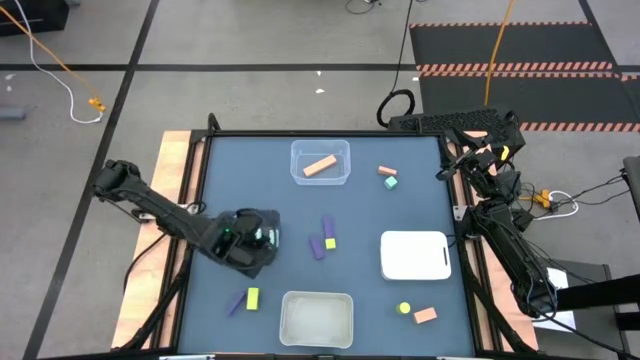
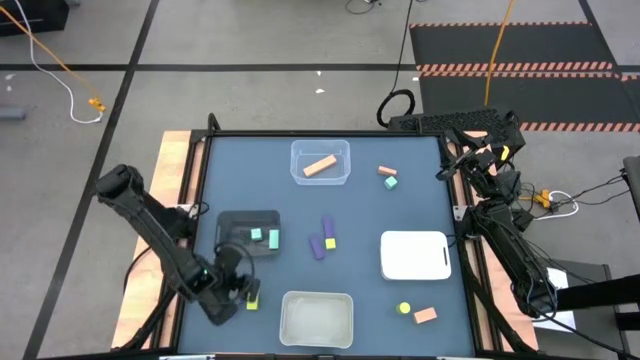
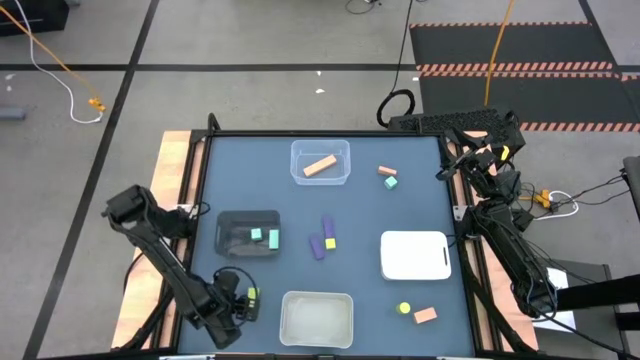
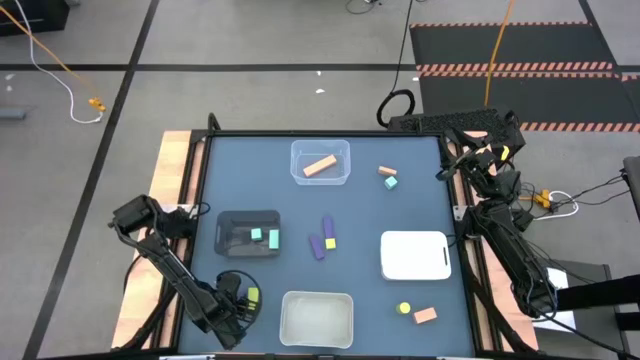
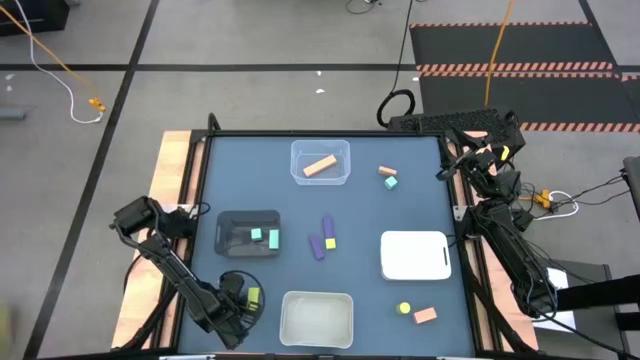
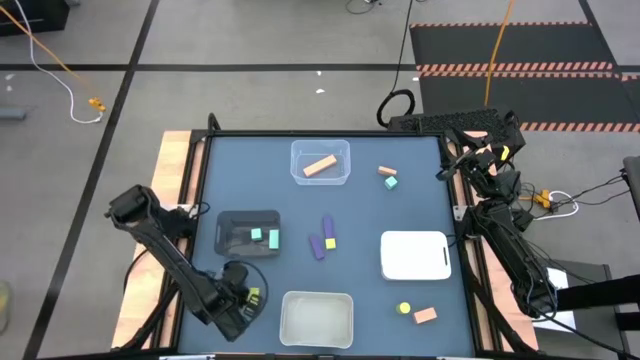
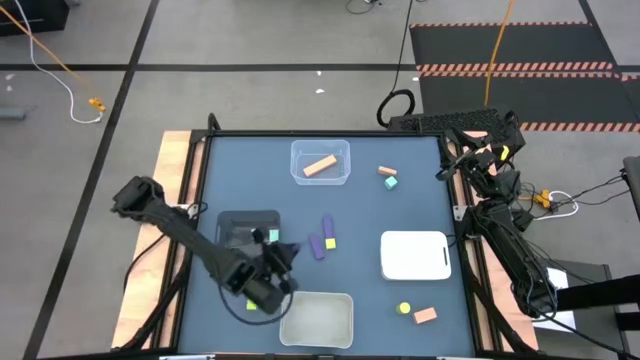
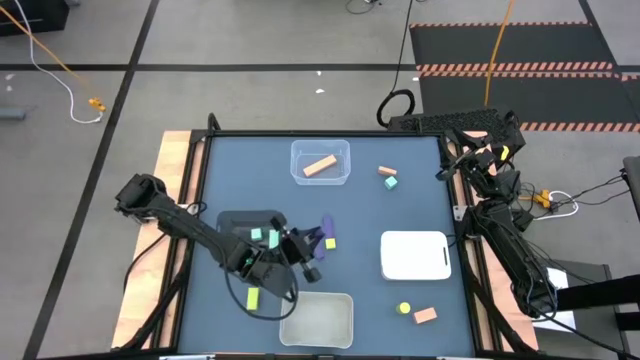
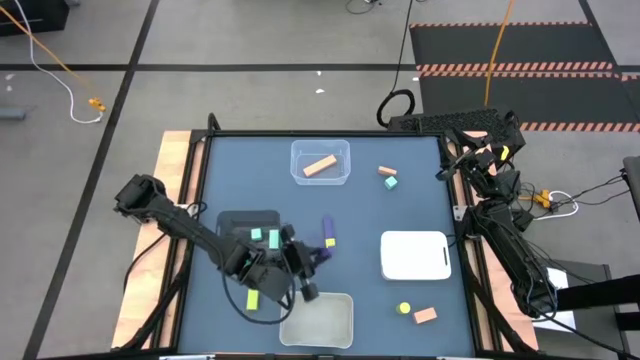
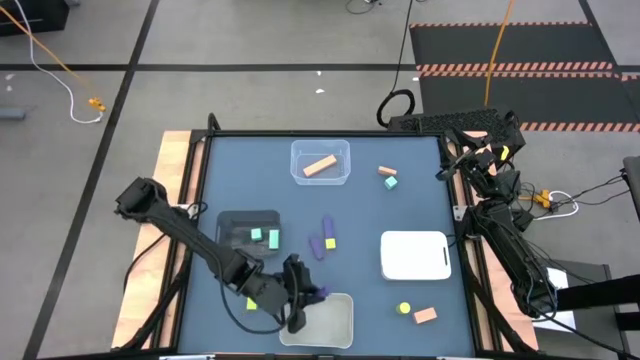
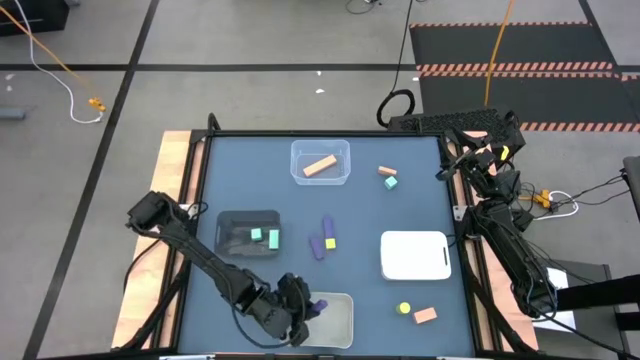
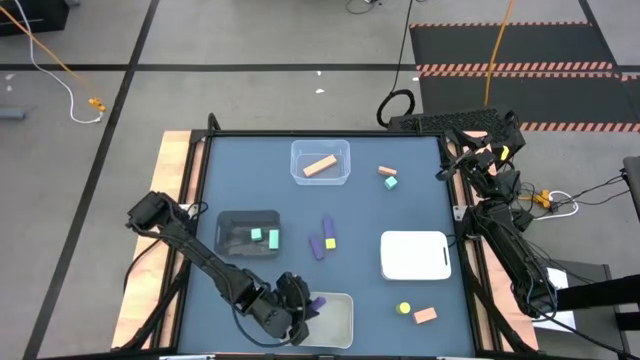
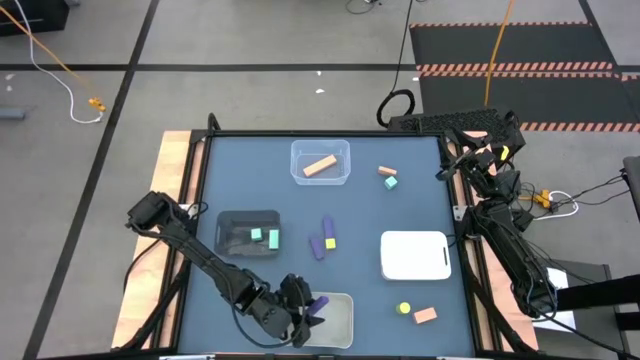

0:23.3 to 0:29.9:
Task: Sort & place blocks by color
Put the bottom violet block into the gray bin

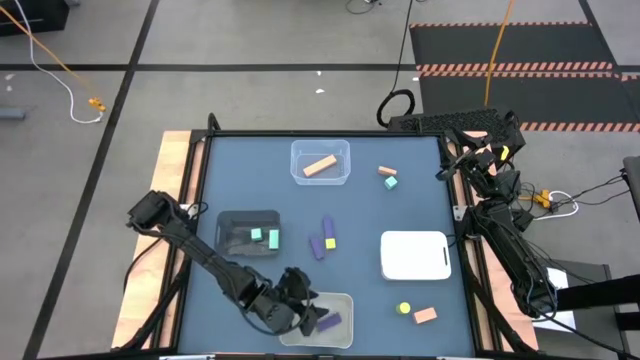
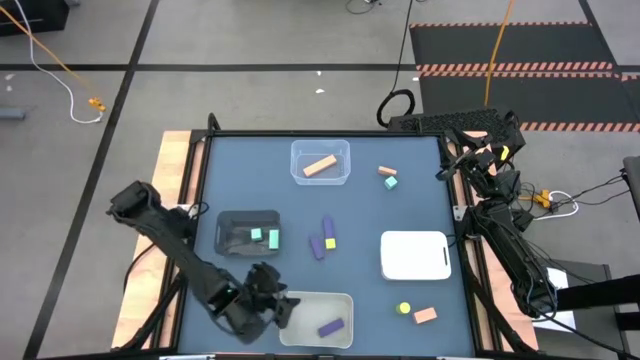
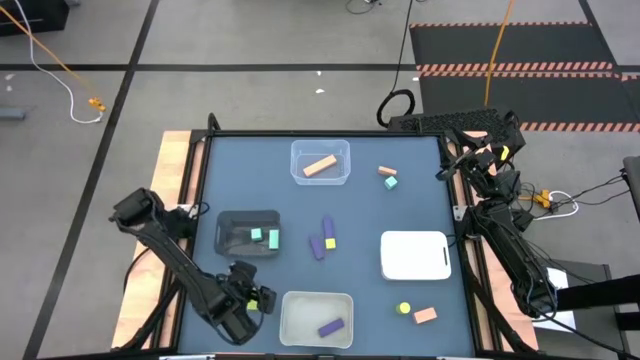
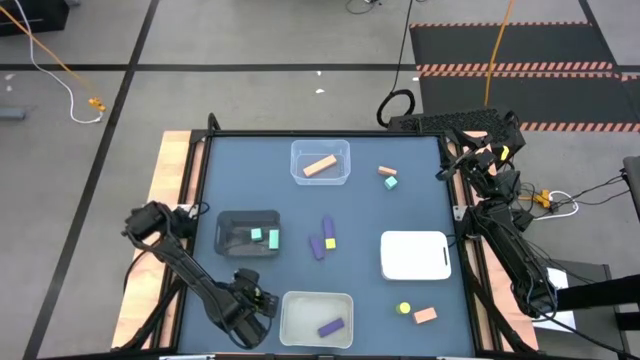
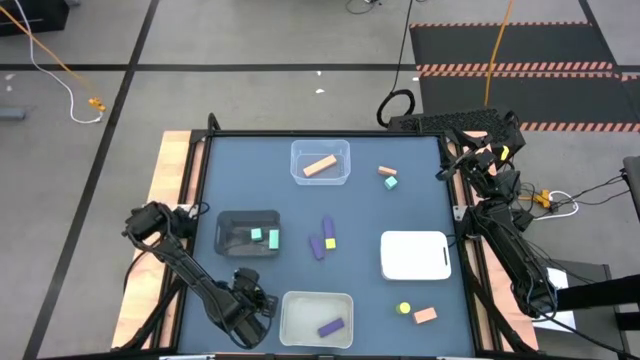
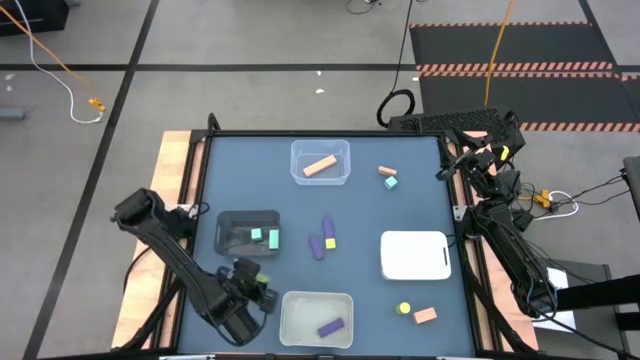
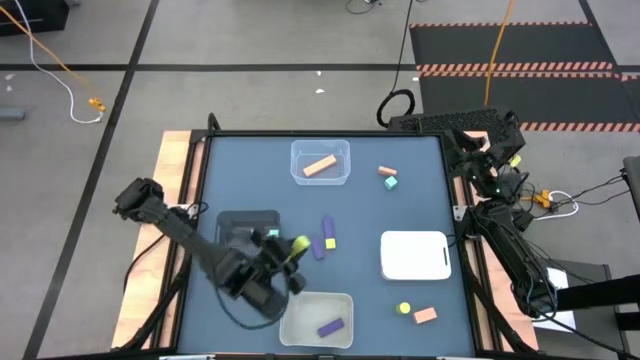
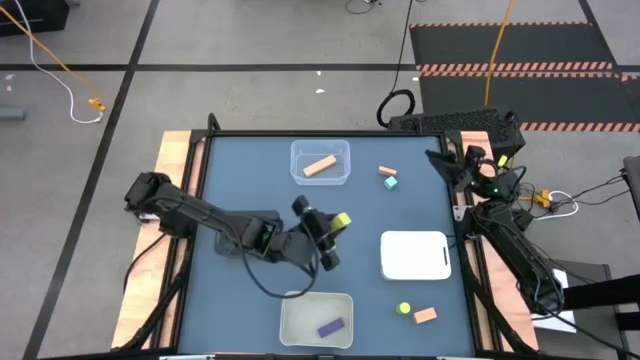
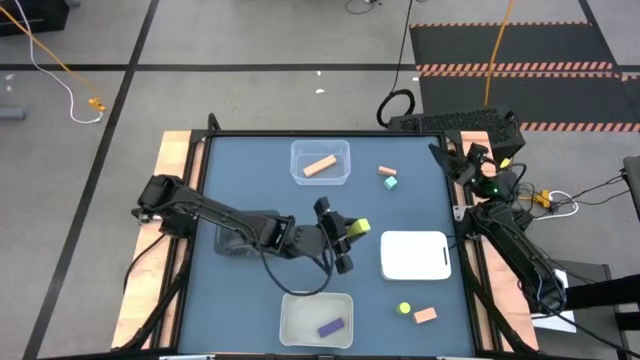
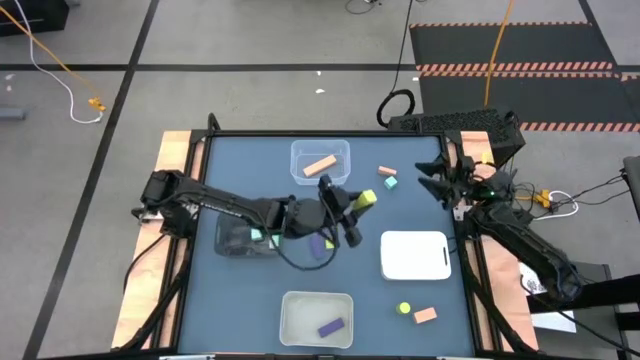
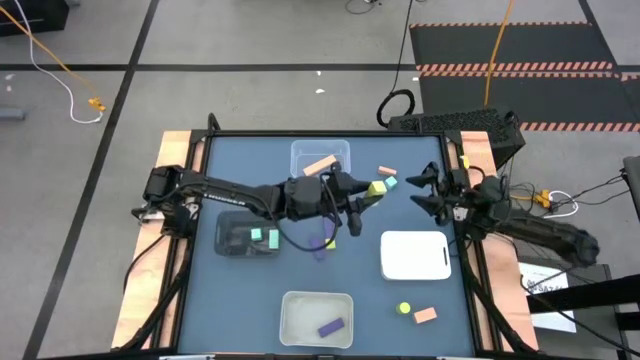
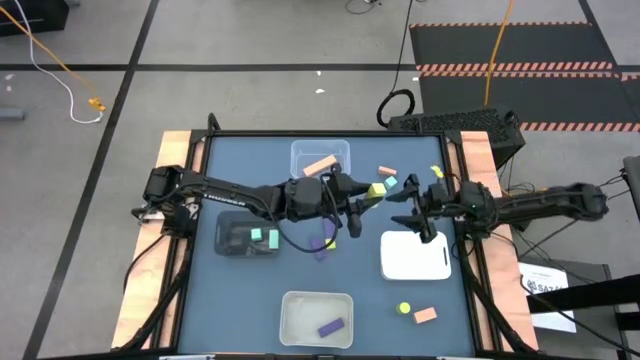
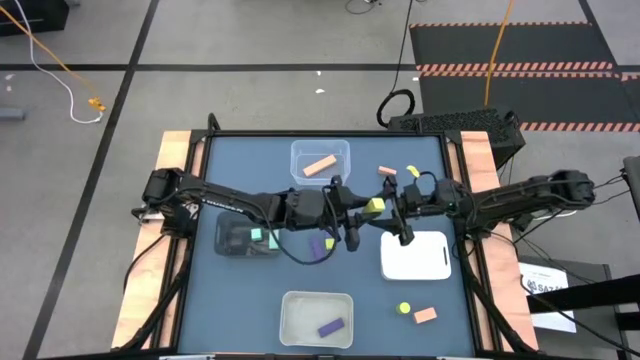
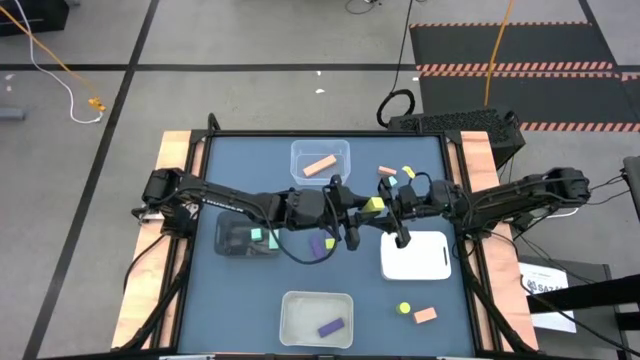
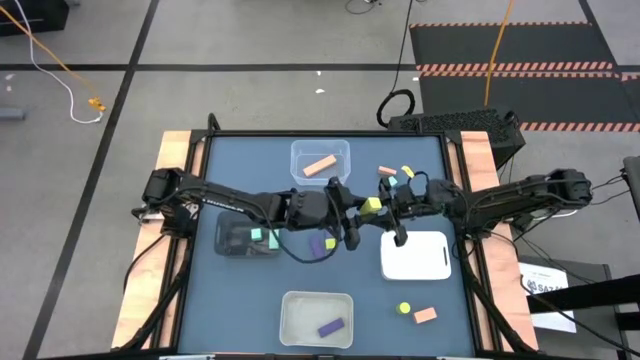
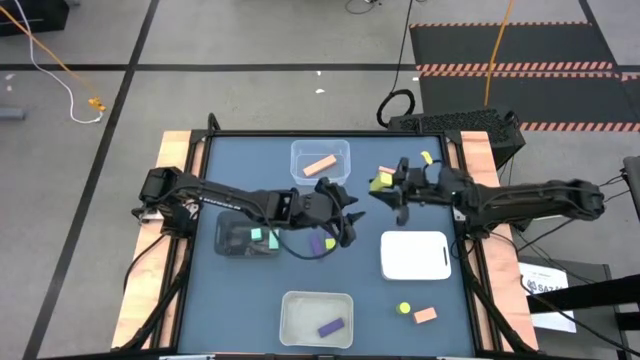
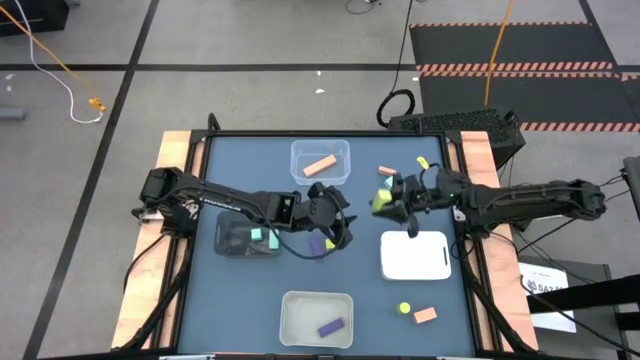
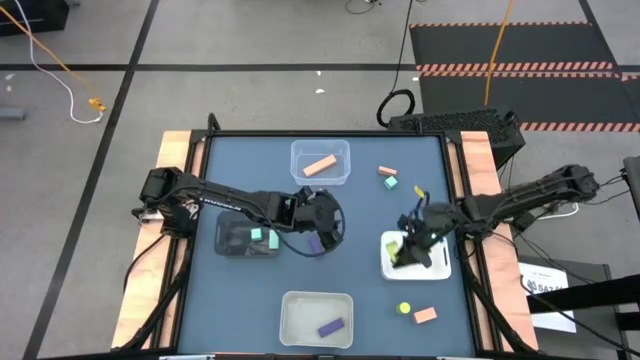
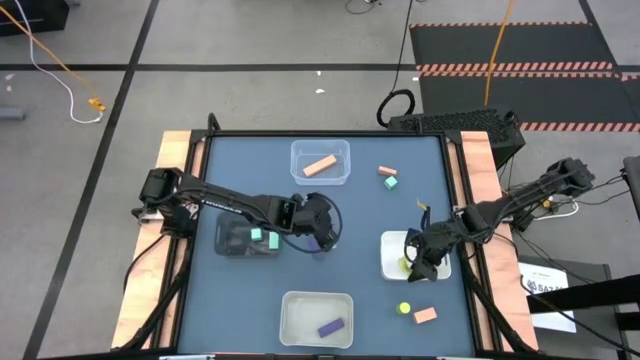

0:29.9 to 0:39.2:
Put the bottom left green block into the white bin

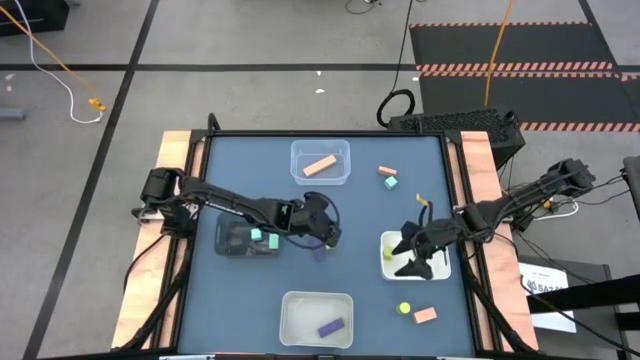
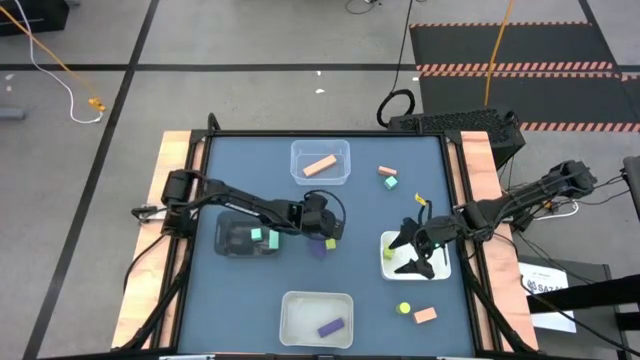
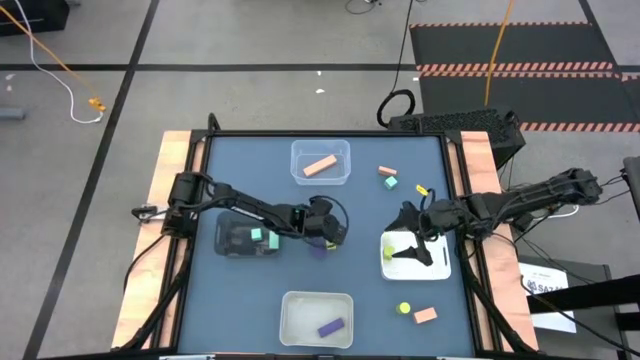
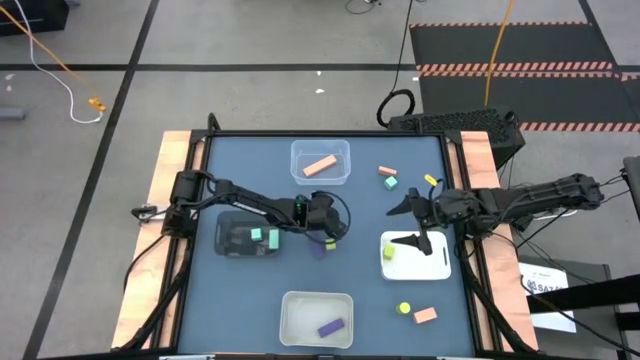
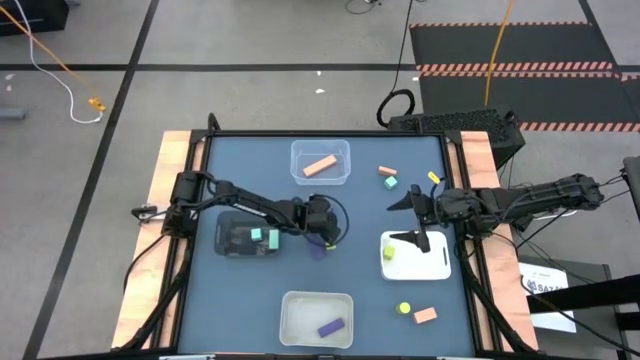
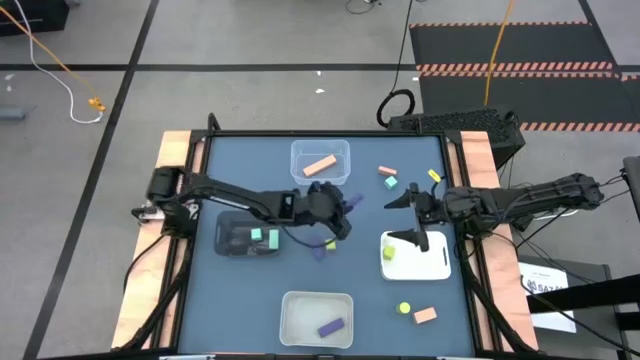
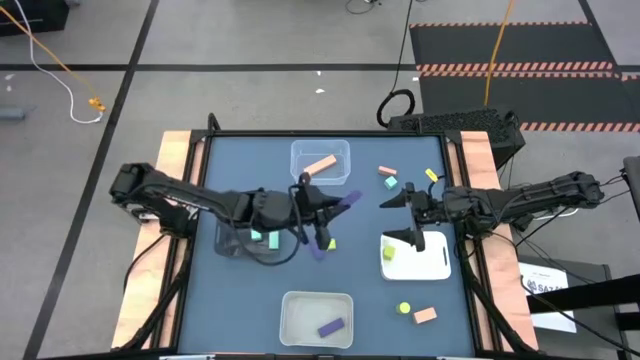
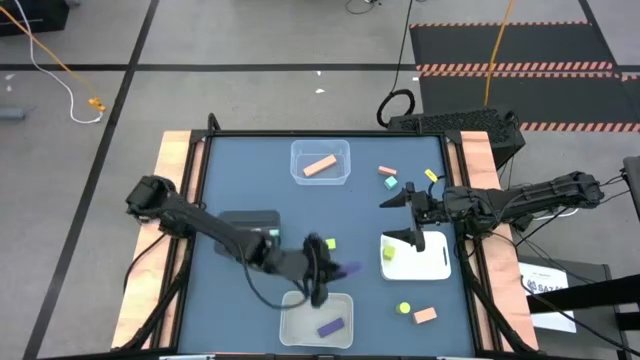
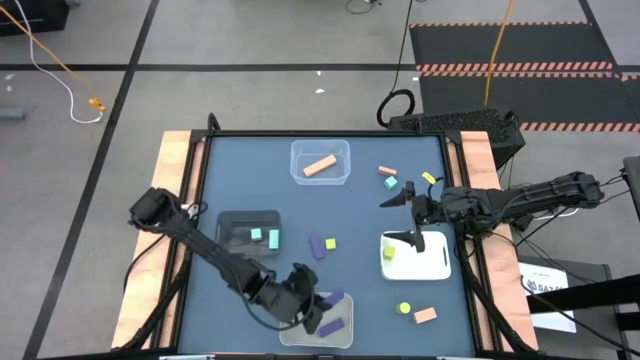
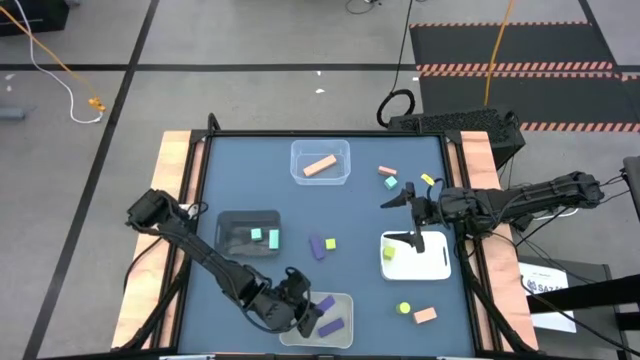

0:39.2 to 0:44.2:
Put the top violet block into the gray bin

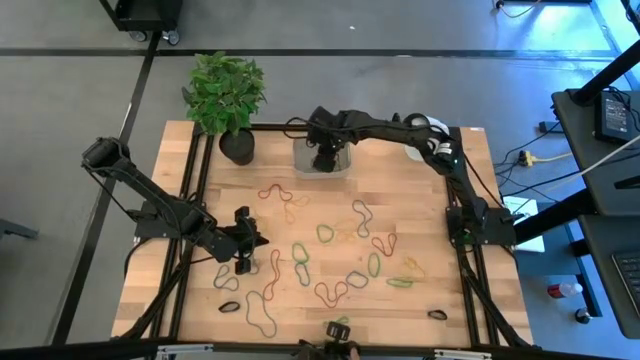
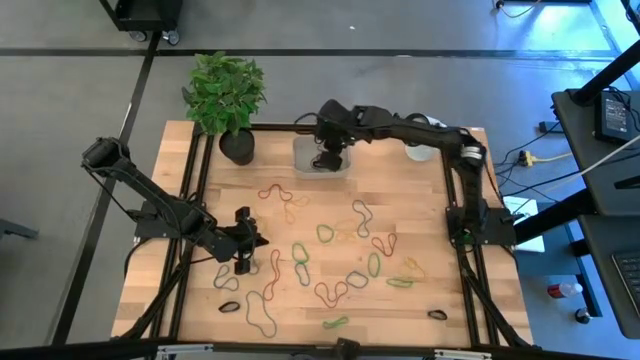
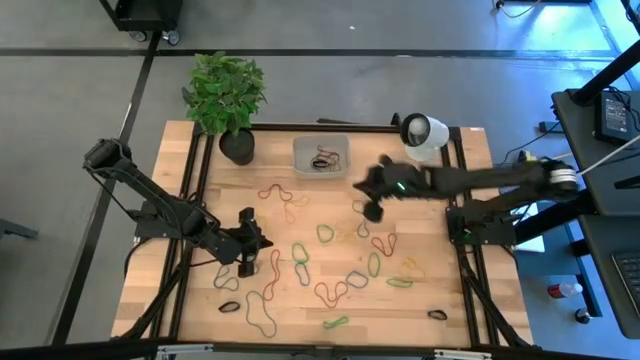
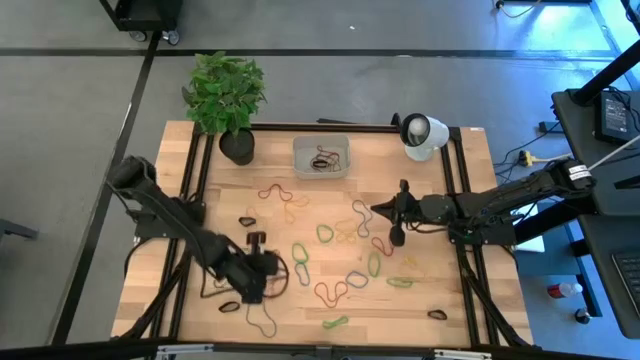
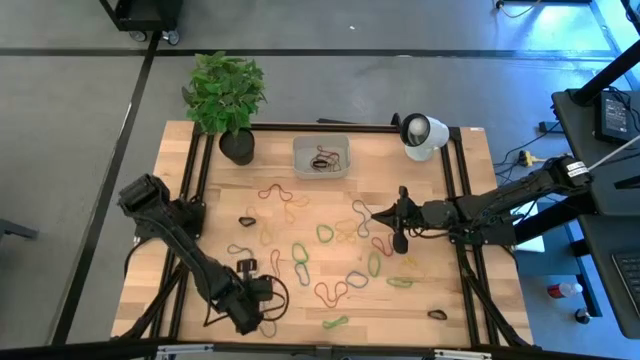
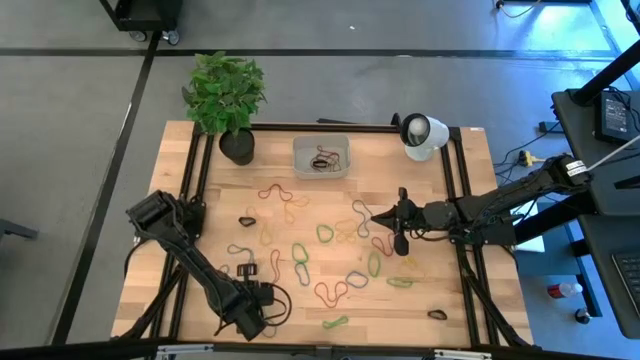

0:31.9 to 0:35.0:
Task: Pick and place rubber bands into bin
Put the blue rubber band into the gray bin
